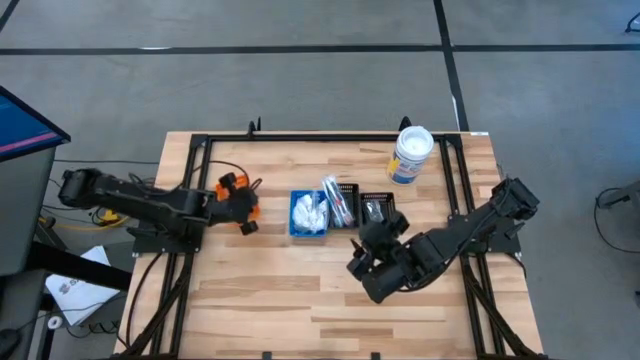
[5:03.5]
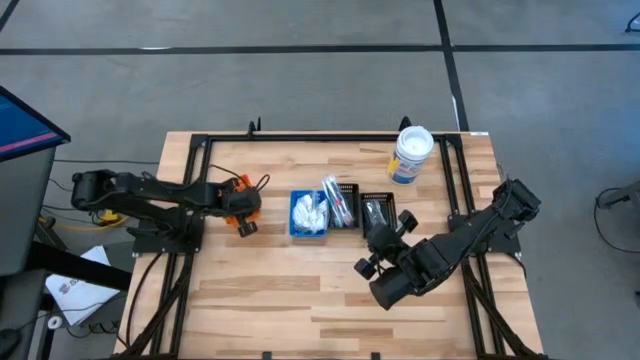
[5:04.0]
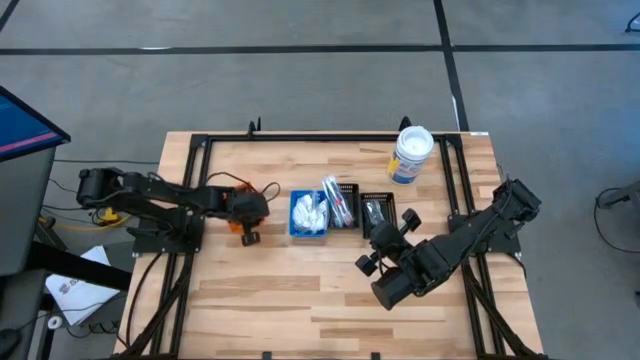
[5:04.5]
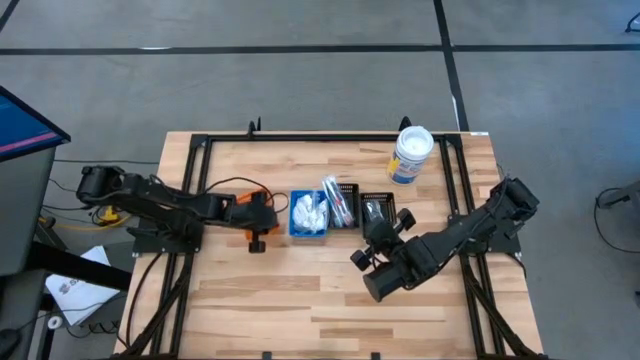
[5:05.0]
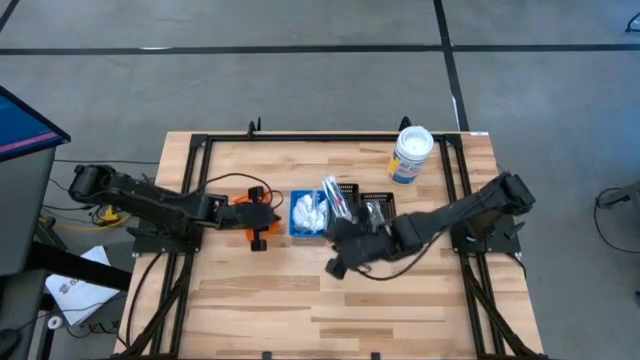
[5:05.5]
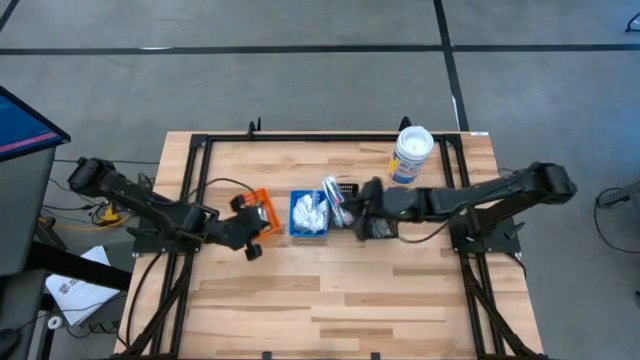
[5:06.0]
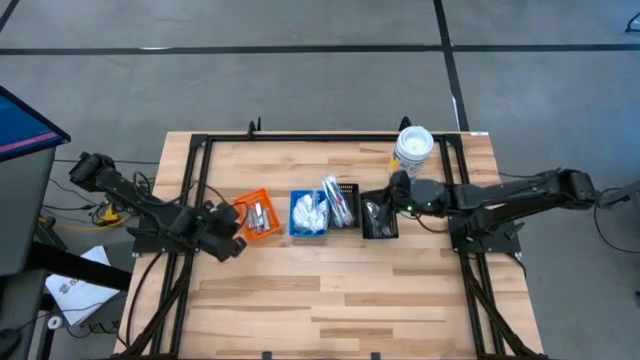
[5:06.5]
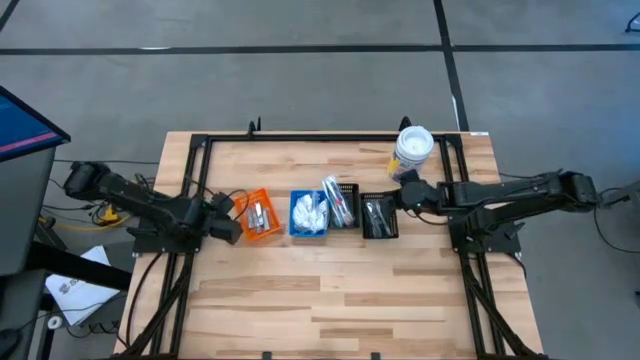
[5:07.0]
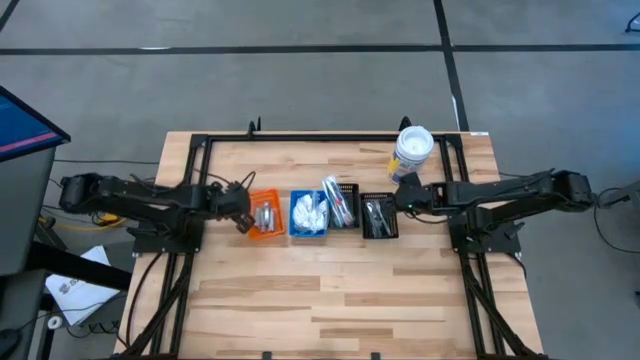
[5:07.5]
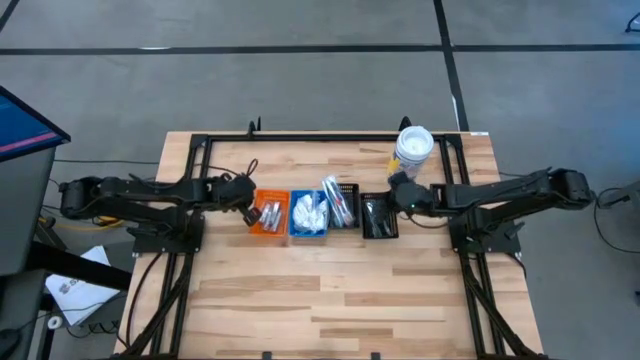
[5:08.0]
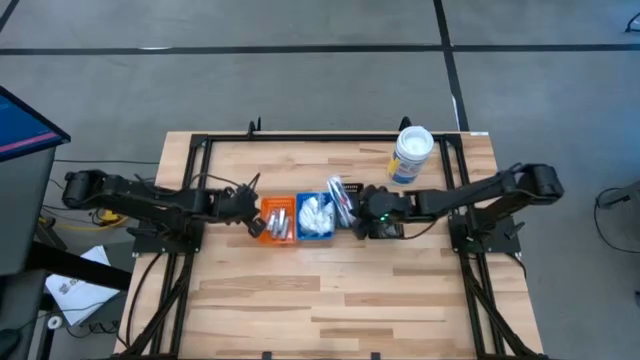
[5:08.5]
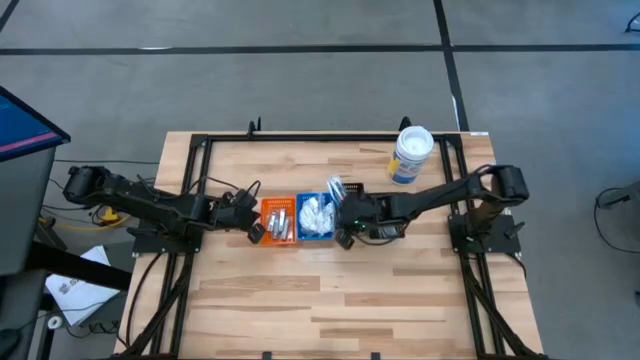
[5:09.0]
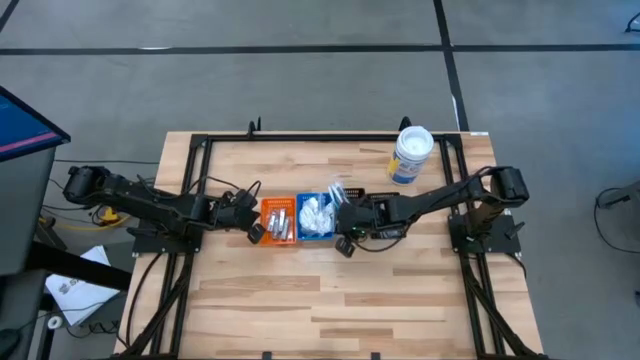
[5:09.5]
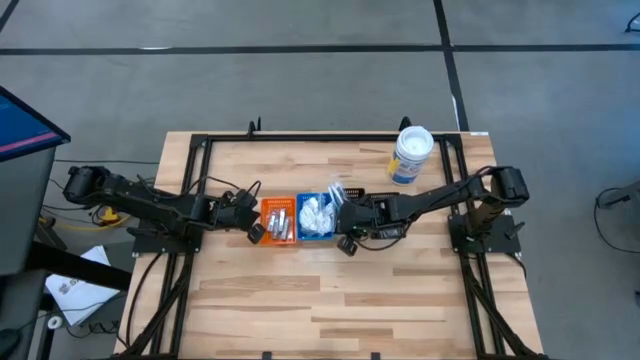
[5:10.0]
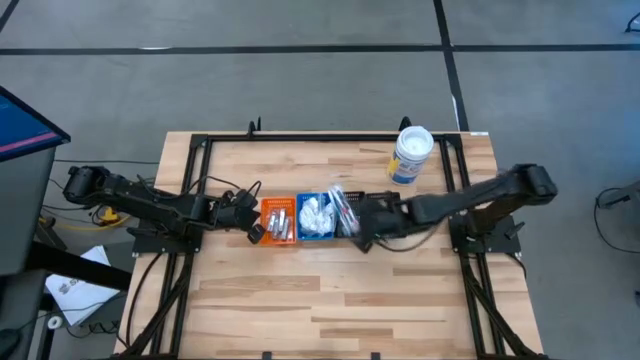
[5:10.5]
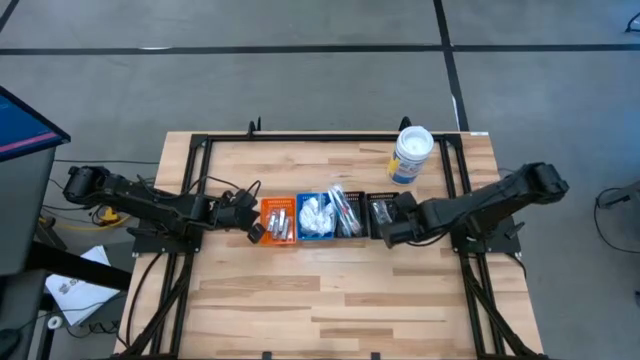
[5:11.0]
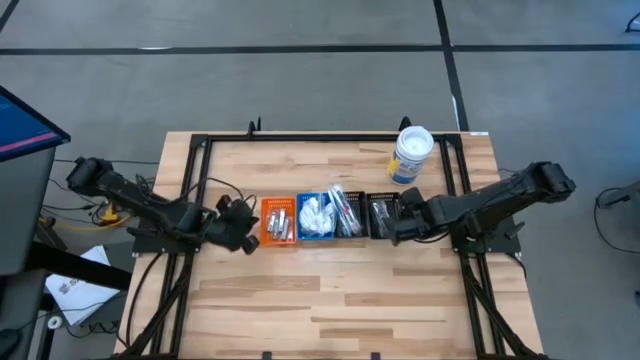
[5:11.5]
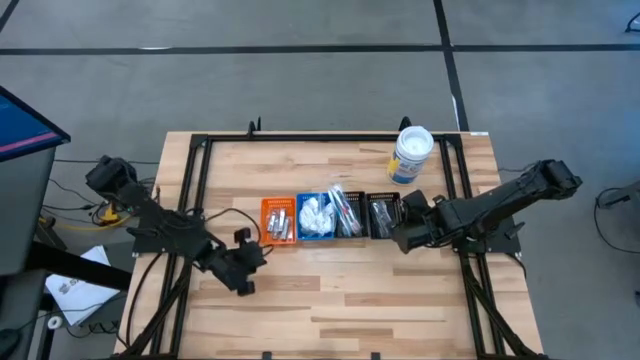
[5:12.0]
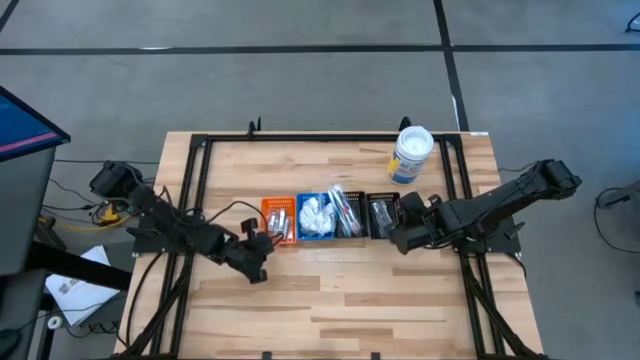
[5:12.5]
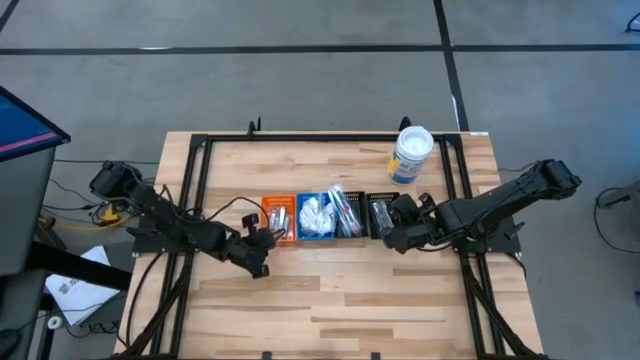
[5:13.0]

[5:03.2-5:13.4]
Task: Pick & Place Travel size toiletries
Adjust the bins

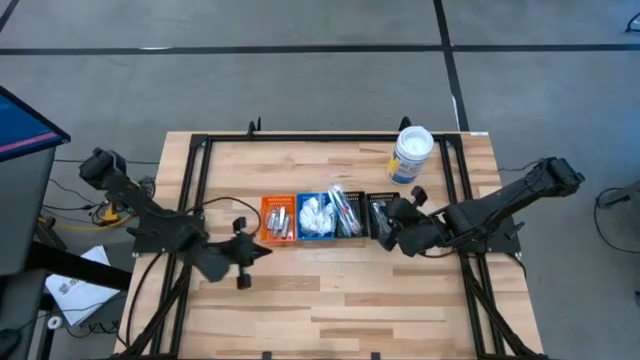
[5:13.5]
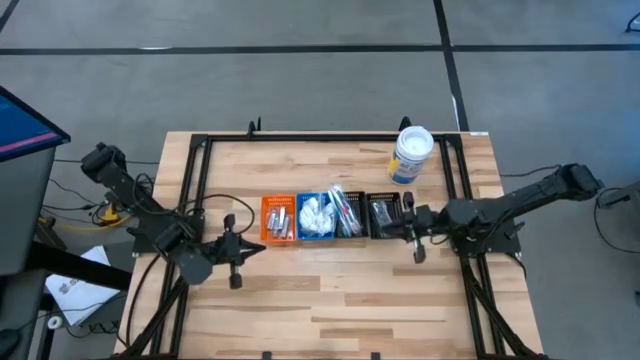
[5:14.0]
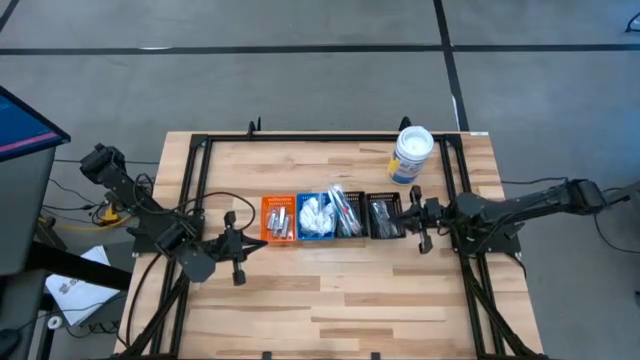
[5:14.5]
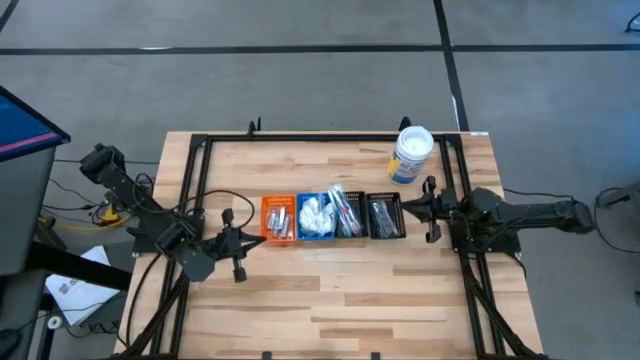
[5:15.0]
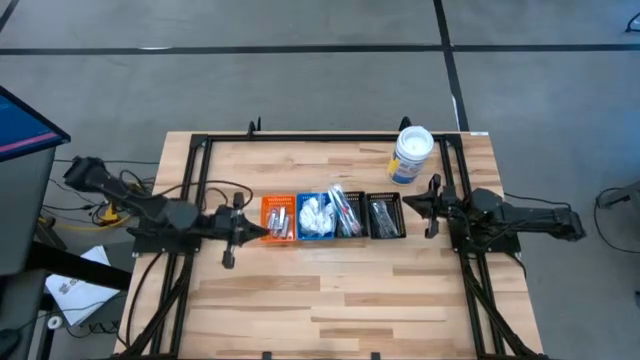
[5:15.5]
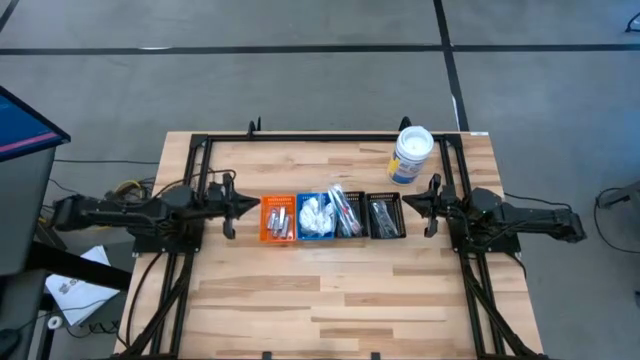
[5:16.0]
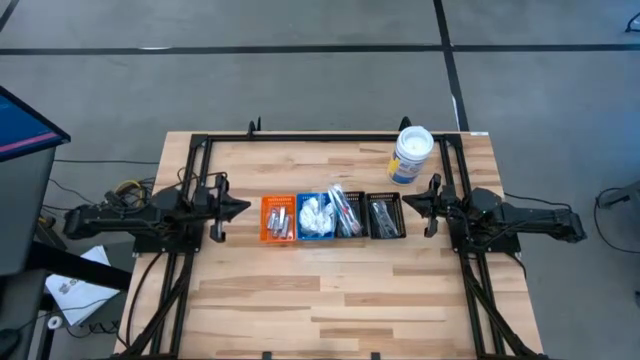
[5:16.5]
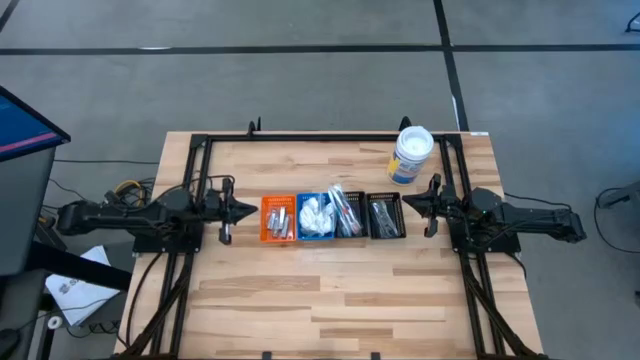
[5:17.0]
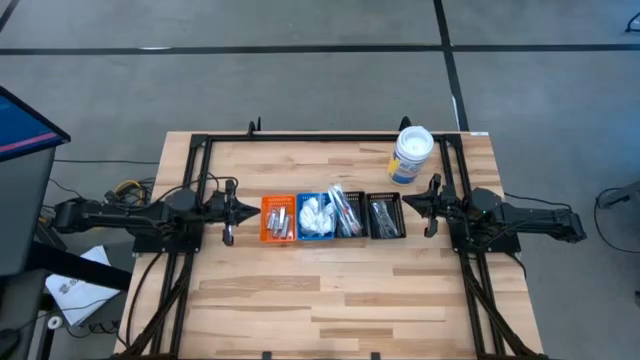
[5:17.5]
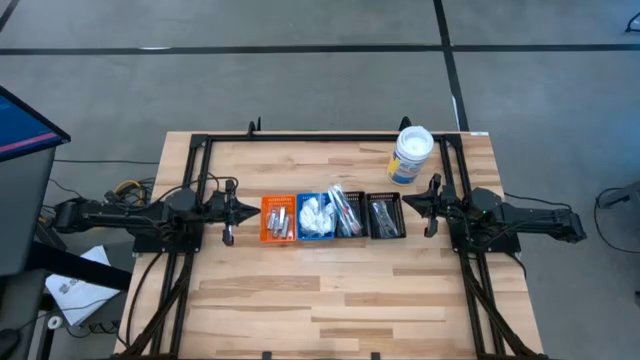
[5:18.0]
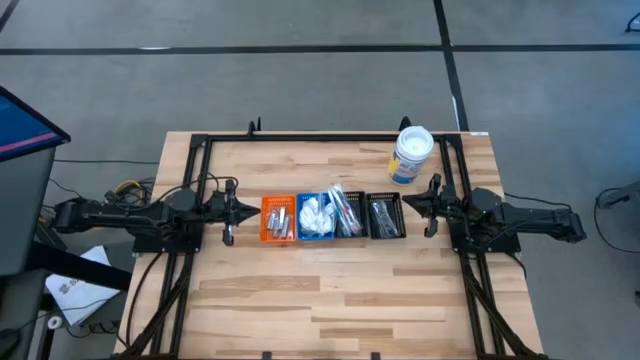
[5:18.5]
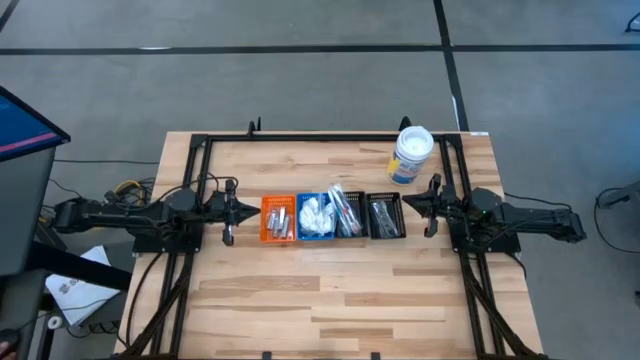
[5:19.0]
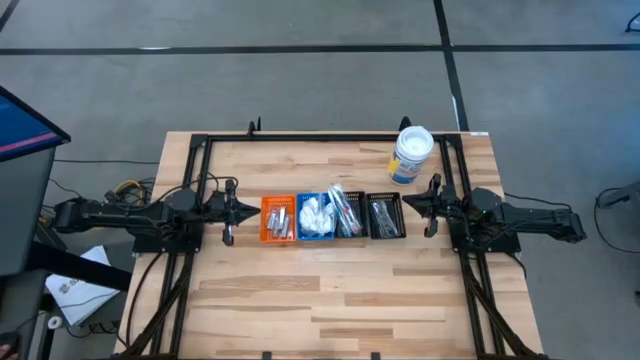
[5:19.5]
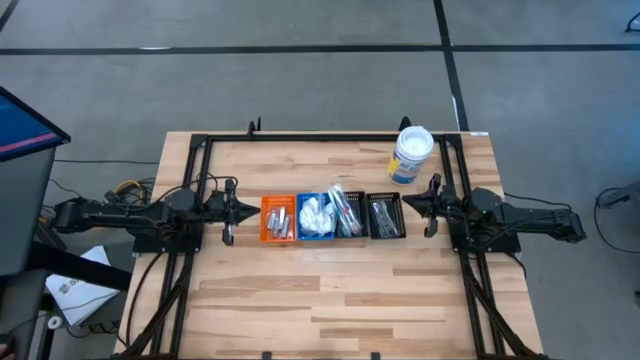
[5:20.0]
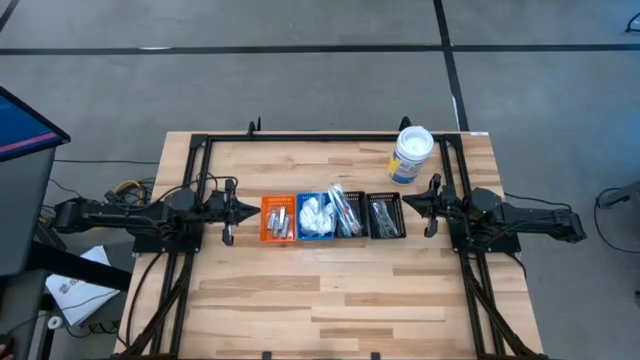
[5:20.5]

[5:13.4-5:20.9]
Return to Home Position

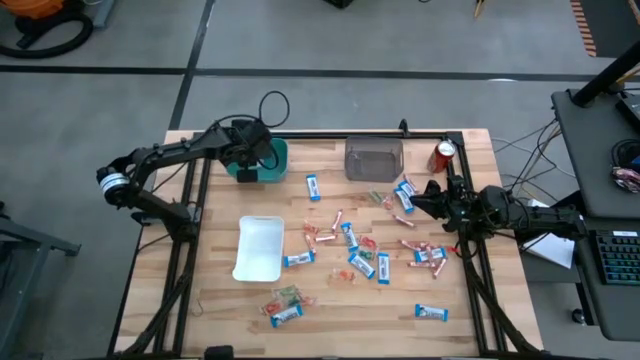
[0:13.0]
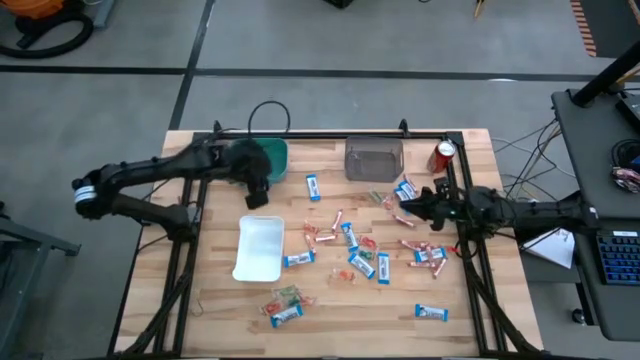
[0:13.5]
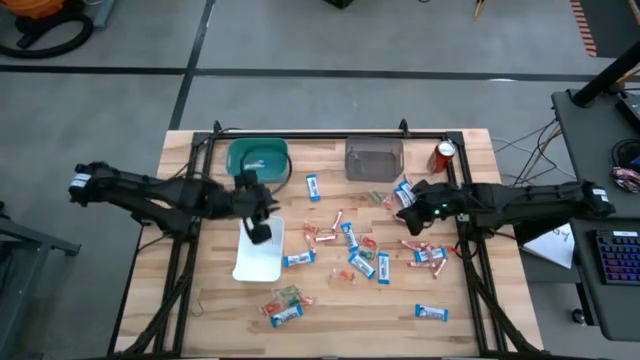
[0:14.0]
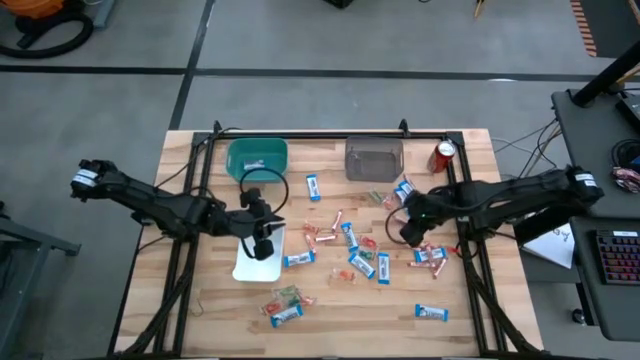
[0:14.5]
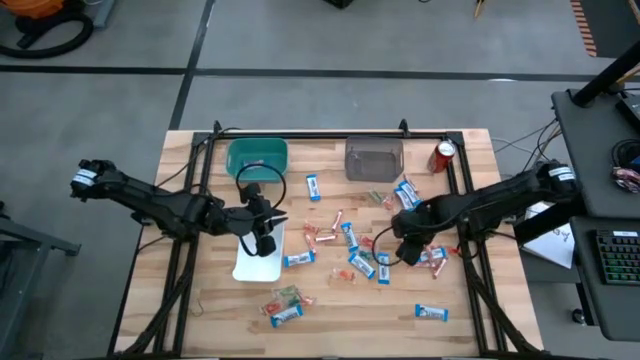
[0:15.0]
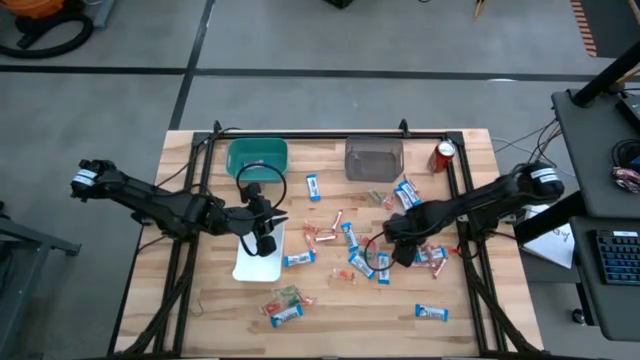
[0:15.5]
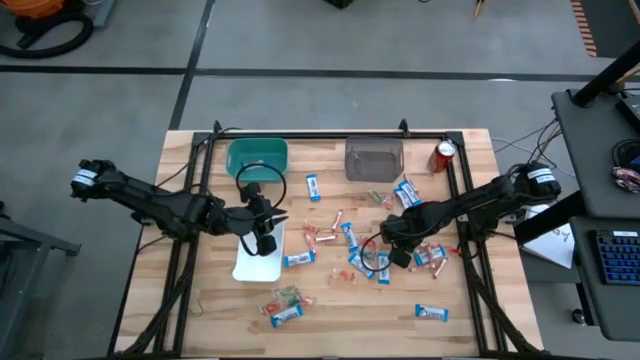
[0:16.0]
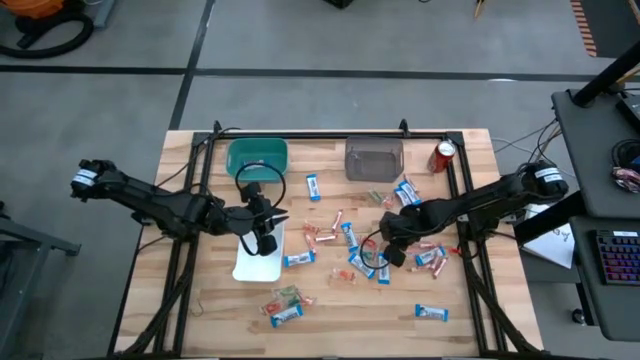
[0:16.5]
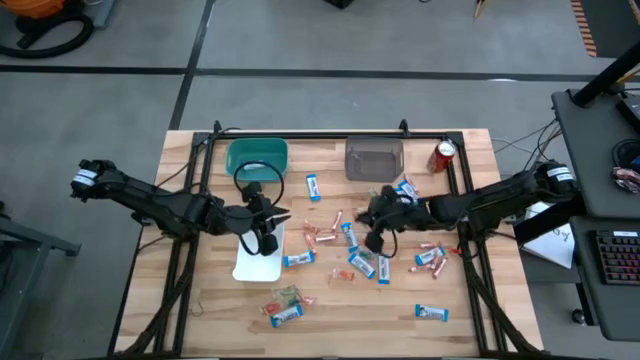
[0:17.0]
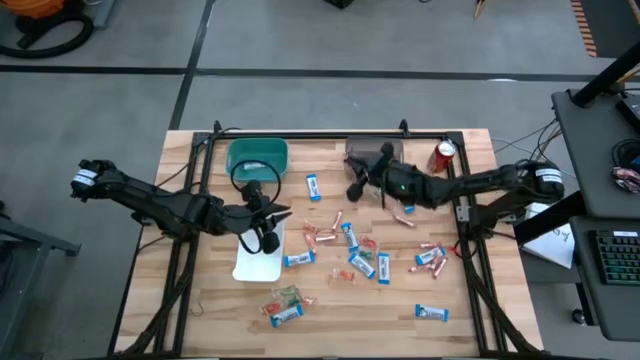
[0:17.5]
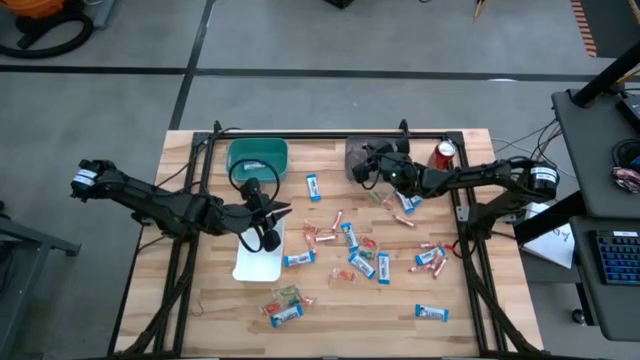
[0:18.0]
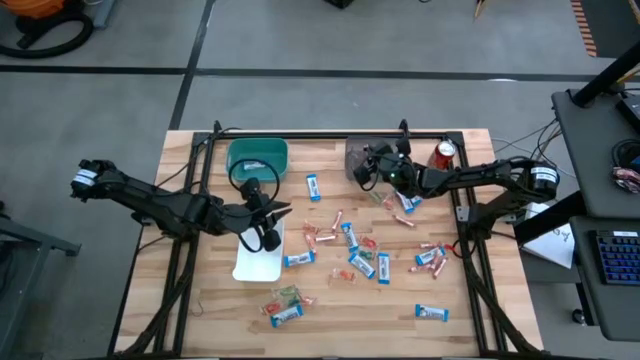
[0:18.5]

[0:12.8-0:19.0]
Task: Sort candy
Put the transparent candy rolls into the black bin
